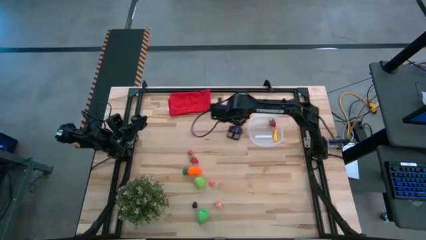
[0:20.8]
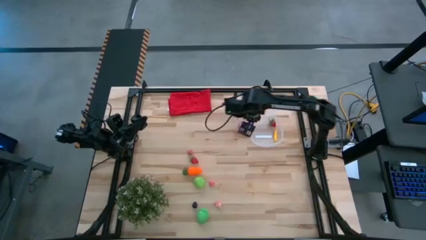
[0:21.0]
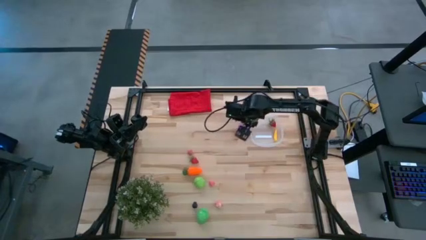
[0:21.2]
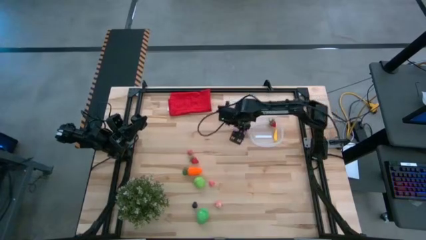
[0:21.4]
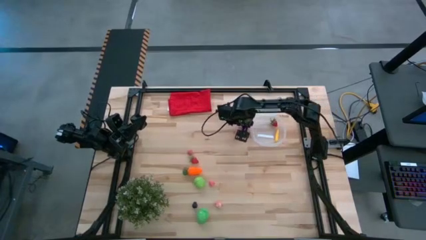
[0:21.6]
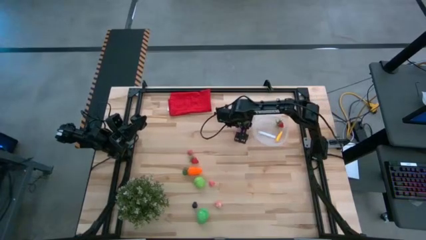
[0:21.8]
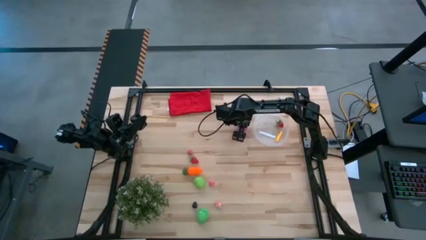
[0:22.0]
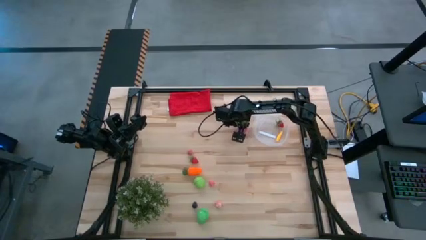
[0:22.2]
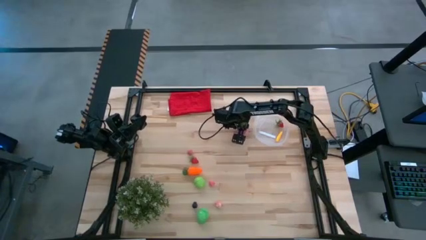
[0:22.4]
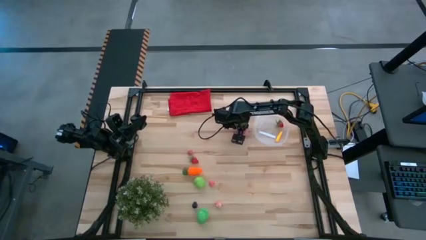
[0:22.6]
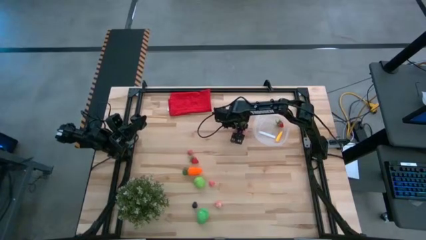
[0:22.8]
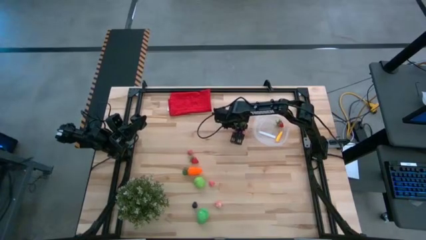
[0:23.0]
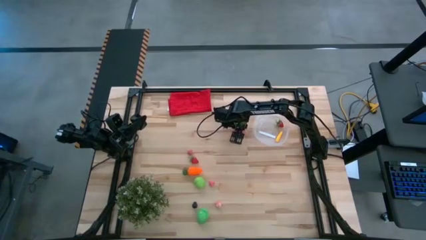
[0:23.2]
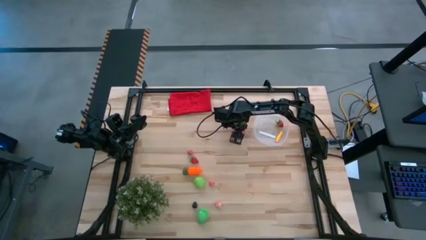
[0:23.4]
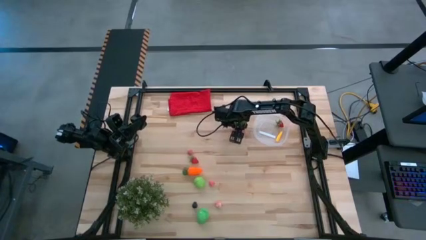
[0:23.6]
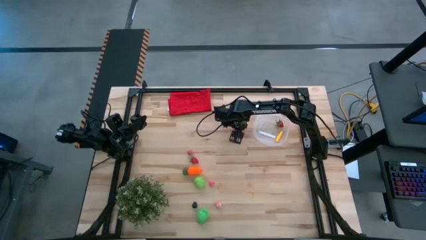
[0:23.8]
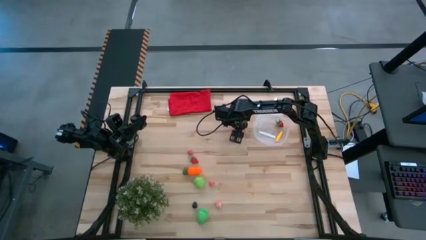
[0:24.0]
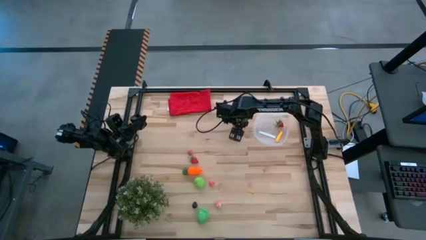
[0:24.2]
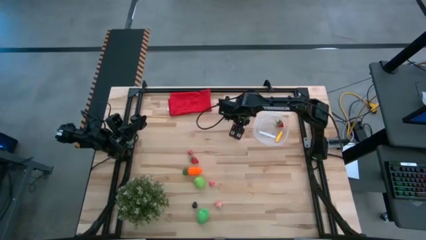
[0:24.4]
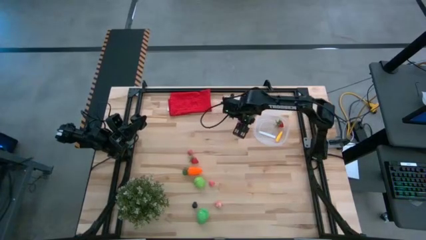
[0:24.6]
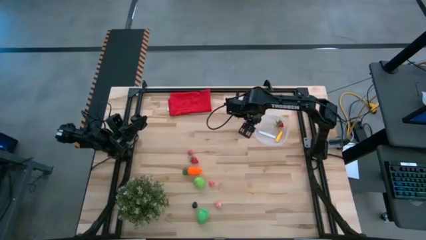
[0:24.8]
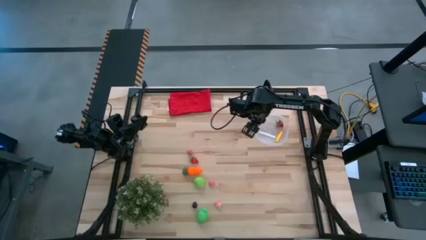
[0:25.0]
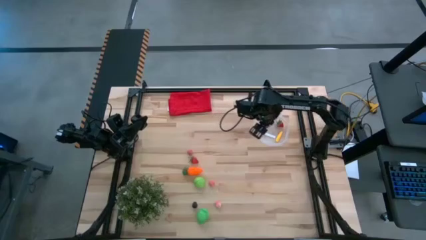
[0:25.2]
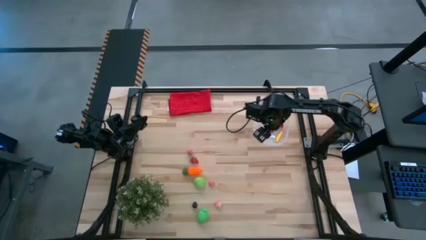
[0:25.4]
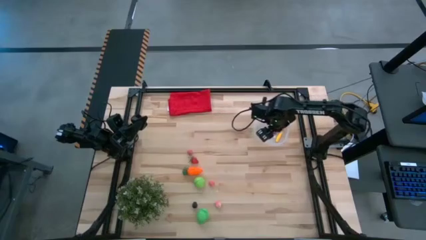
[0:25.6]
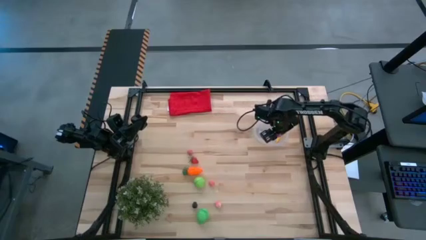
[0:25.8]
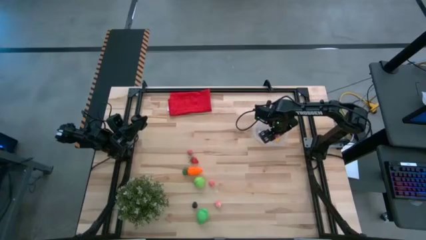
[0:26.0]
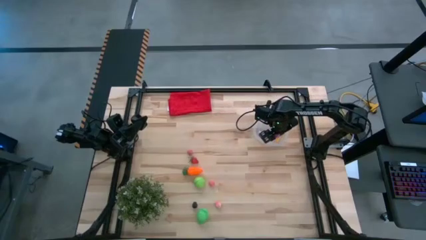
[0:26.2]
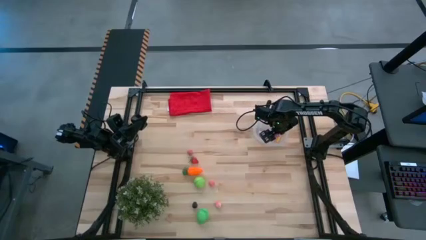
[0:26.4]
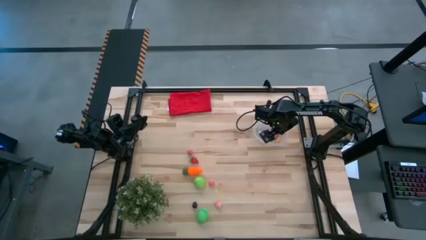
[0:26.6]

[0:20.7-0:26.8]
Task: Pick and placing Produce into tupperware
Put the red onion into the transparent container

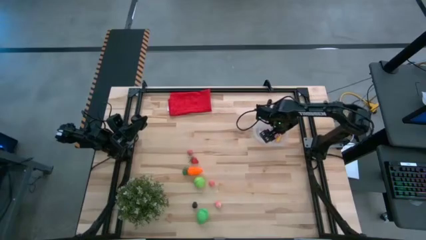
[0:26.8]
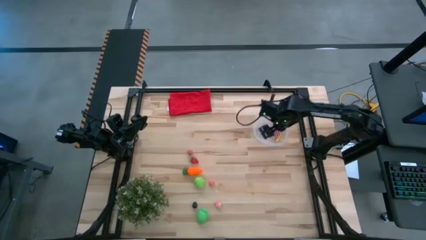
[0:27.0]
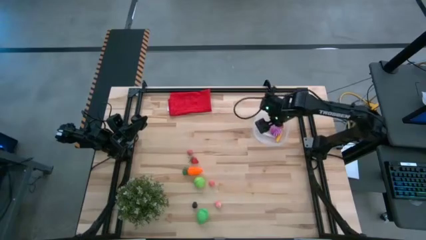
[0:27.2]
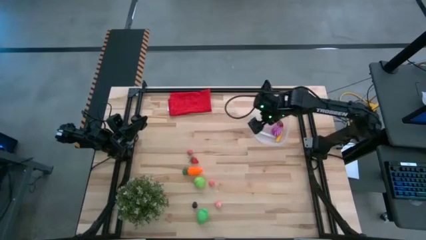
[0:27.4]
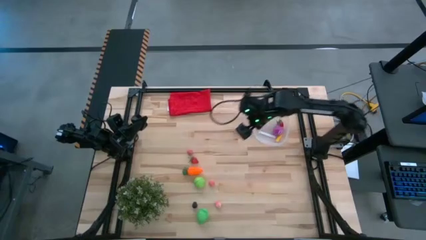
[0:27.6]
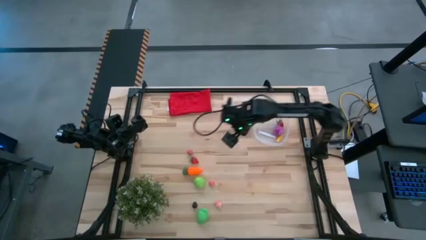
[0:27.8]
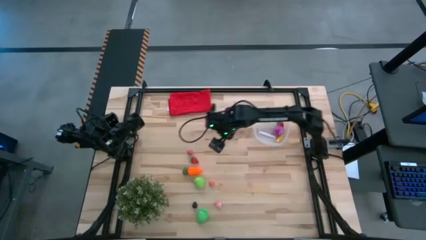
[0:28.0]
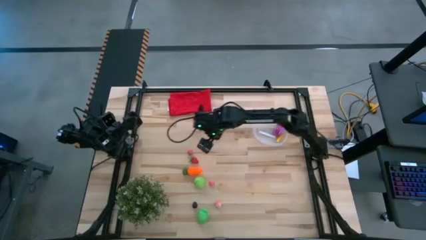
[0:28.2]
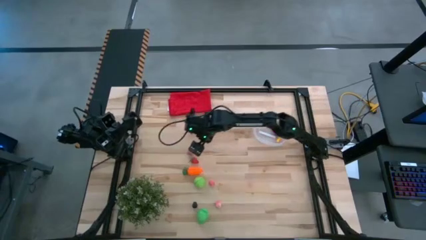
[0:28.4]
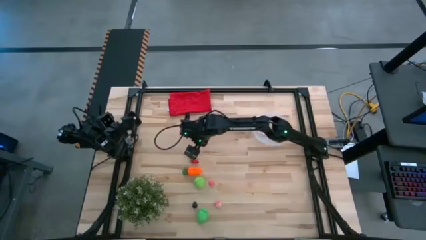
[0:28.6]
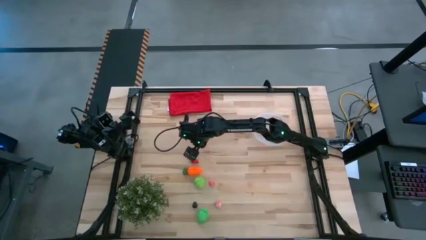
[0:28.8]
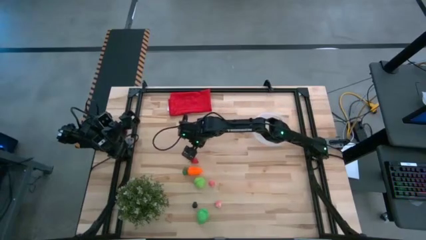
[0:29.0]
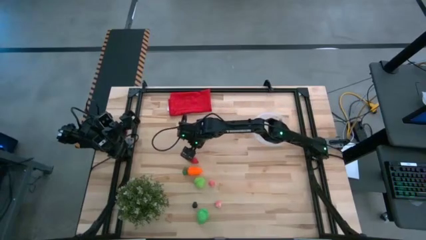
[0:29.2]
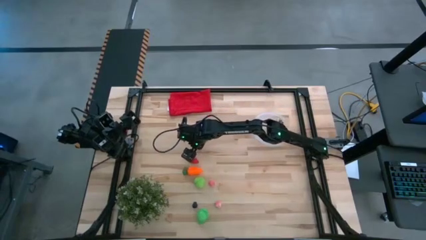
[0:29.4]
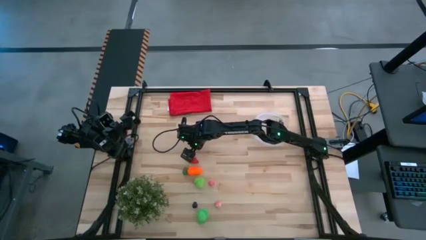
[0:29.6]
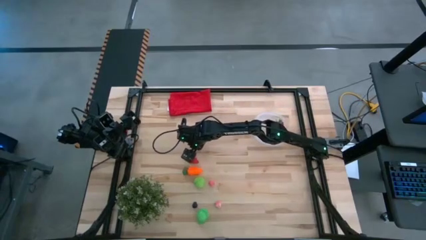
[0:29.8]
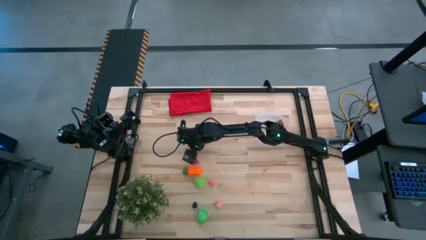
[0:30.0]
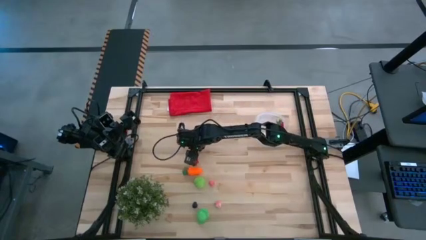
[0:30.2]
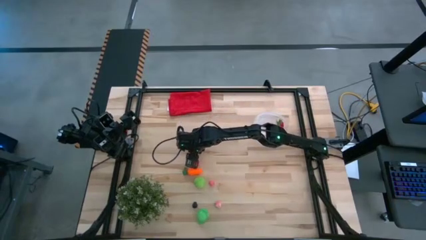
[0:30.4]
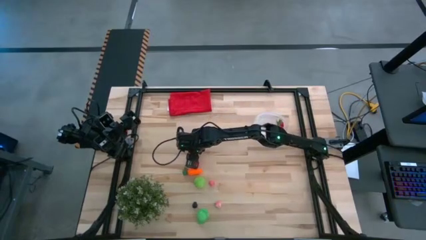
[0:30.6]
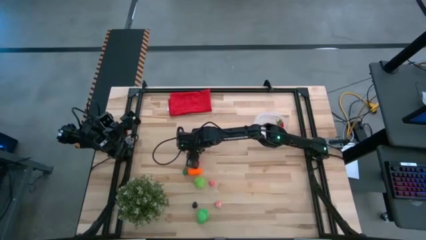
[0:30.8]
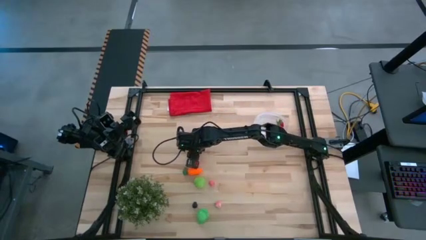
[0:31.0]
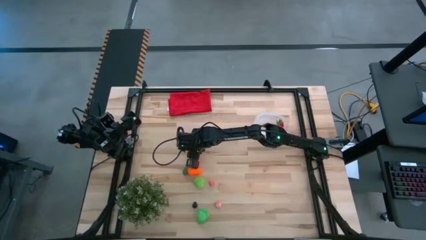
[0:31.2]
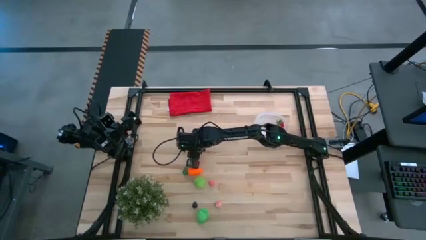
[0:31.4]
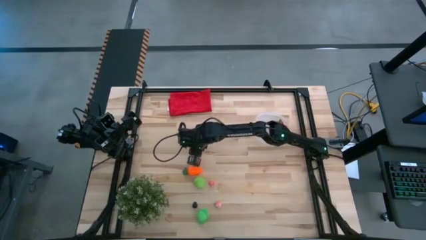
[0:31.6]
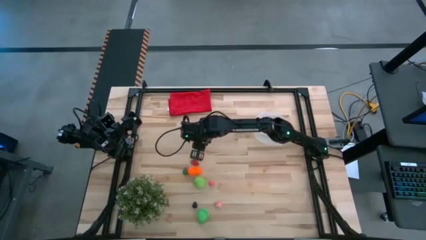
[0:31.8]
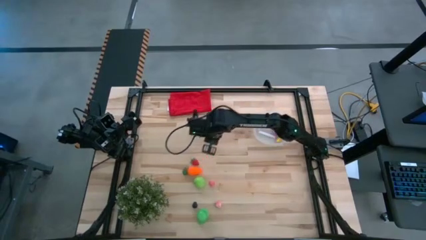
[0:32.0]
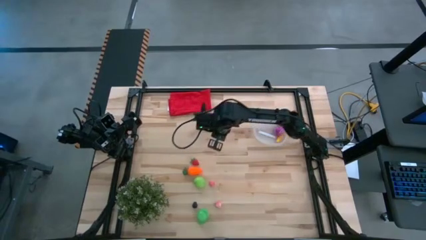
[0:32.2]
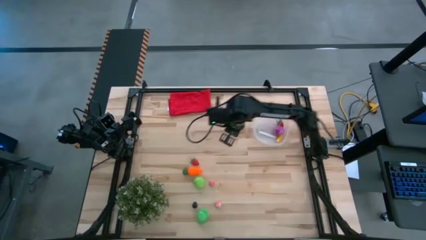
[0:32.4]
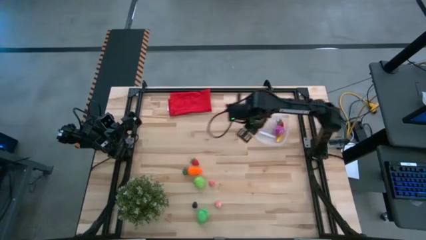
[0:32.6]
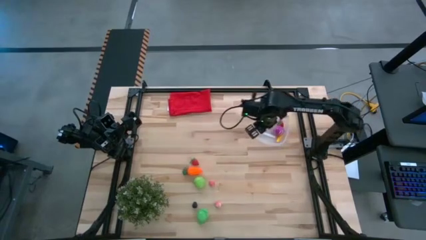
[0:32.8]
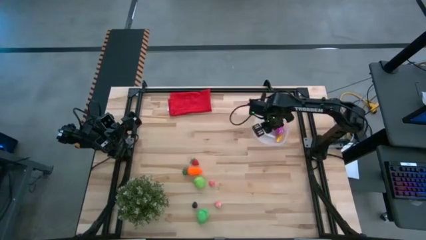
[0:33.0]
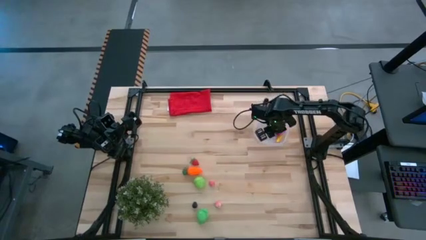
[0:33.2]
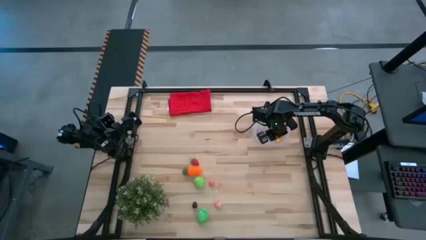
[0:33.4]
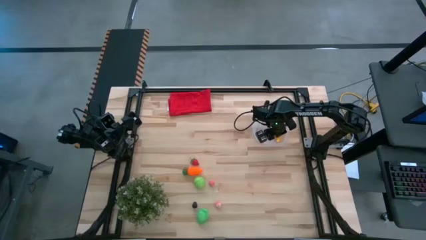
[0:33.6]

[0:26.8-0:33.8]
Put the top pink peach into the transparent container

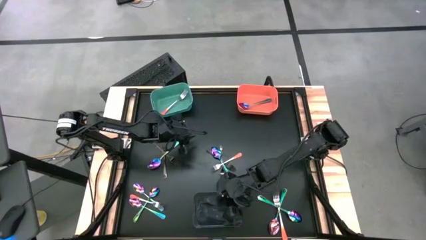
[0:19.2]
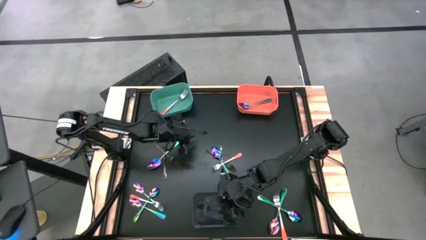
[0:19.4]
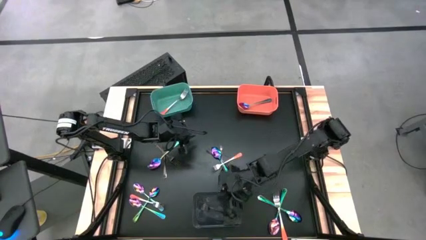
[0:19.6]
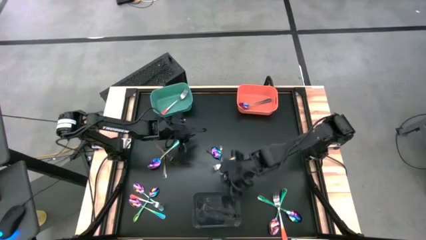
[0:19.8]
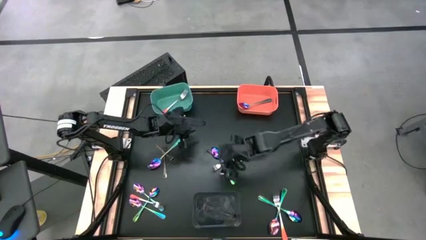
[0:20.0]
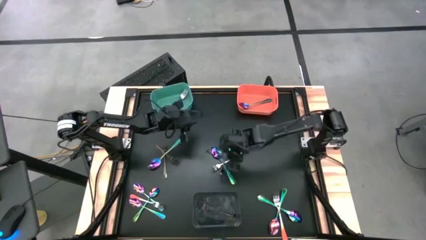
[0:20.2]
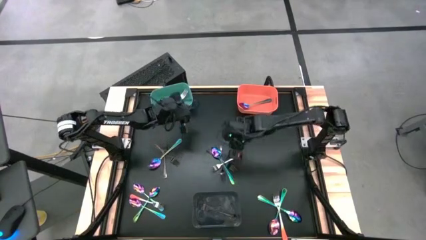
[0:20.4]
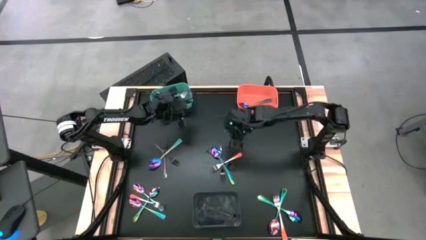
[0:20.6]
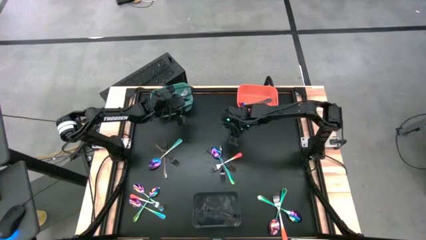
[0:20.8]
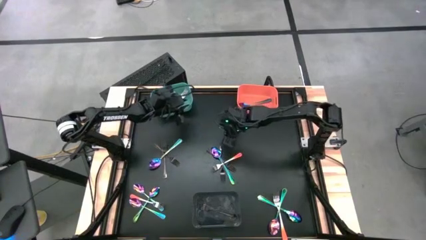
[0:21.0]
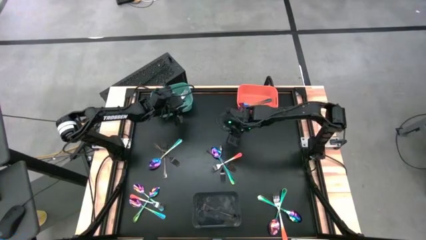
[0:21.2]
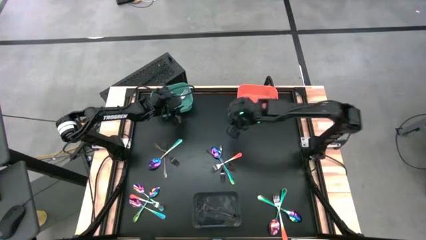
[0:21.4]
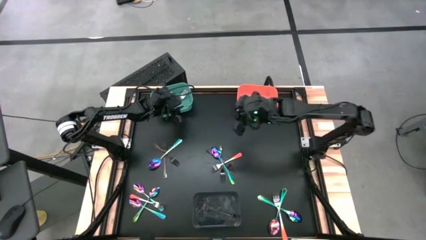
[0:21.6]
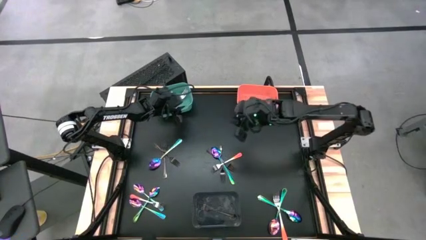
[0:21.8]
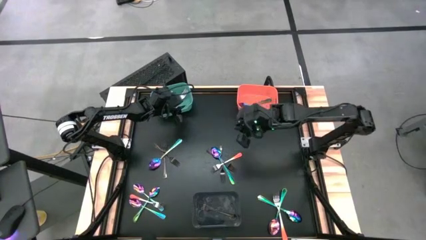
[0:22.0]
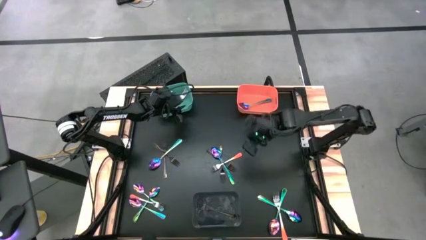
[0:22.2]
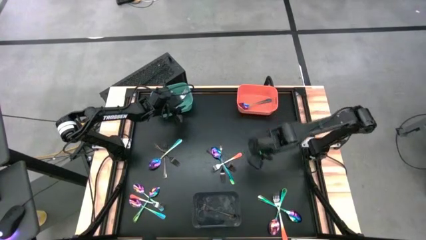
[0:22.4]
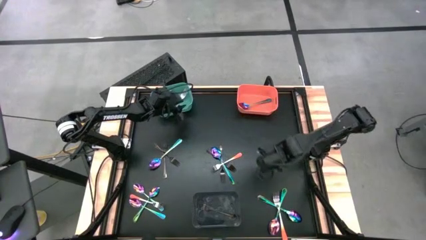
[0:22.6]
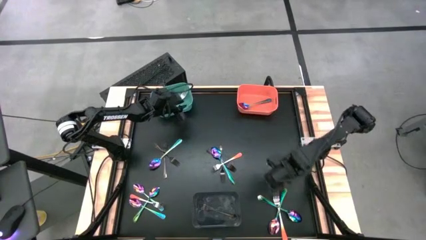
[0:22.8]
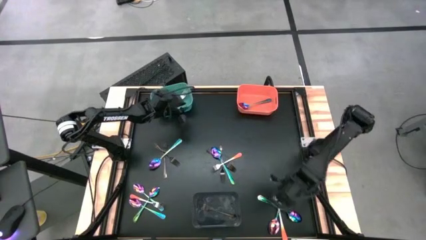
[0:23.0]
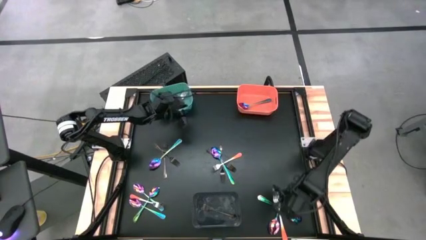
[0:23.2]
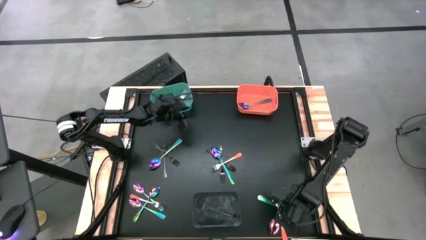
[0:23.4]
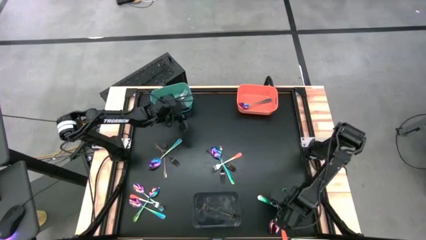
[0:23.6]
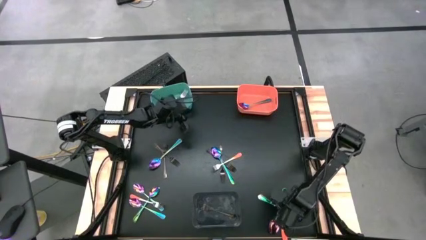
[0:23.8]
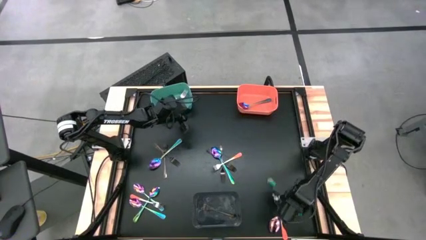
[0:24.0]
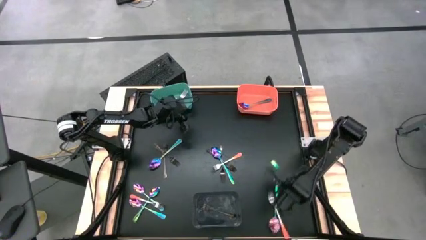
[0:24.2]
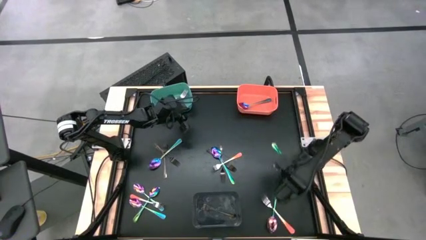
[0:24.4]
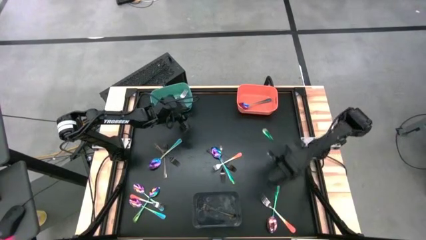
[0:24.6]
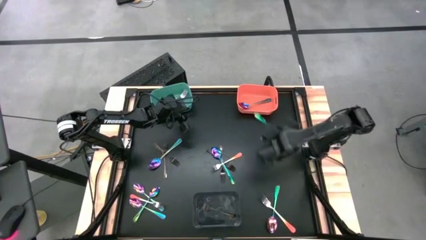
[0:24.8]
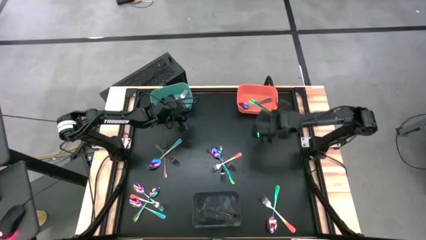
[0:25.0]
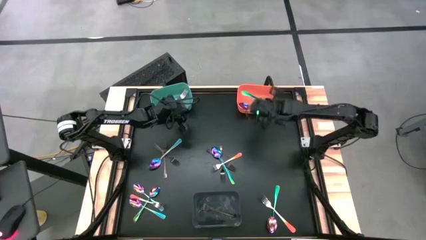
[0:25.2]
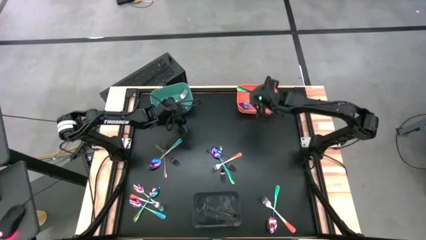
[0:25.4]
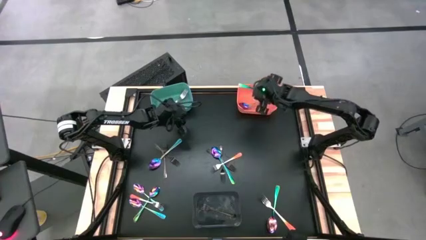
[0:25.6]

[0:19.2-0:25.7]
Task: Sort silverware by color (type)
Put the blue spoon into the orange bin
